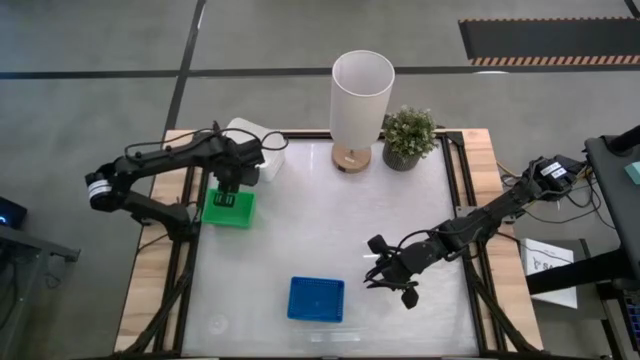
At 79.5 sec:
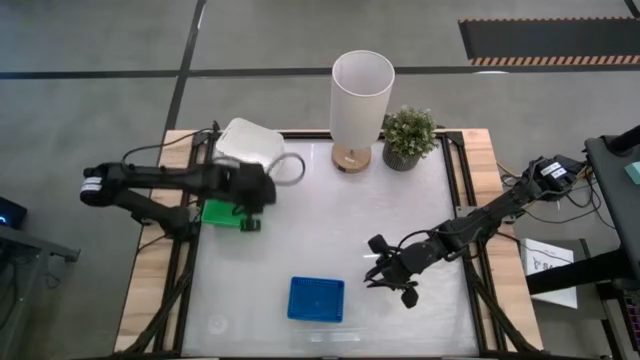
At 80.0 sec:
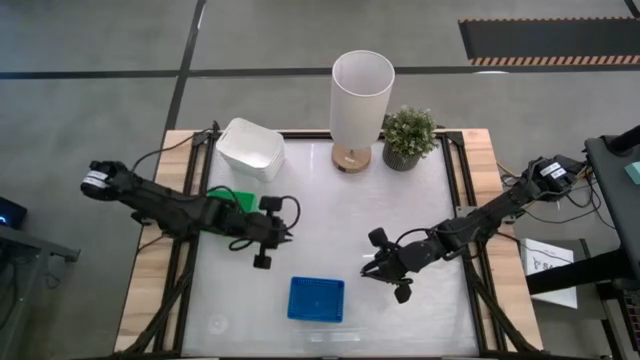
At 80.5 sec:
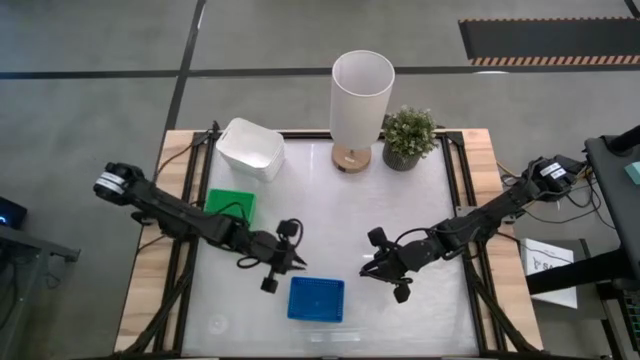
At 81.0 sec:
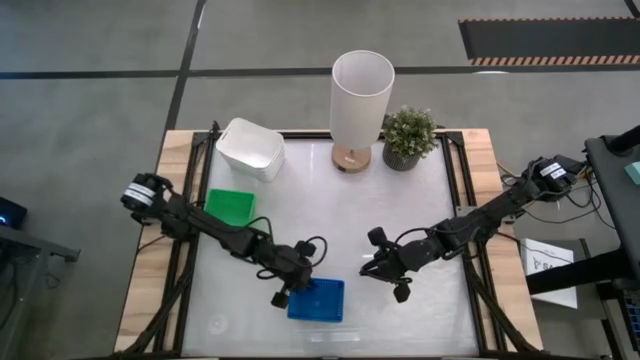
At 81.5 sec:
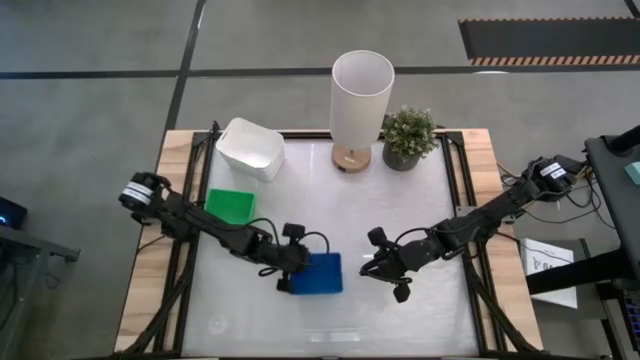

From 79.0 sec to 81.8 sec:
Adjust the stack of blue bins

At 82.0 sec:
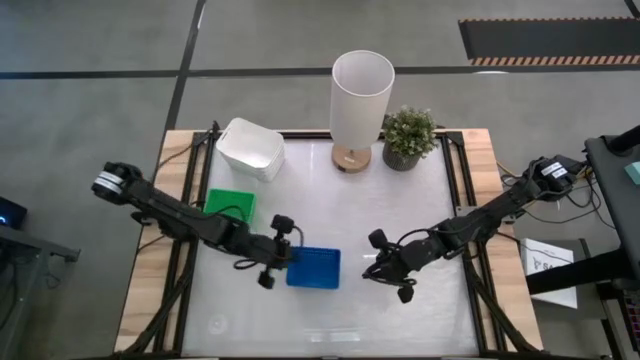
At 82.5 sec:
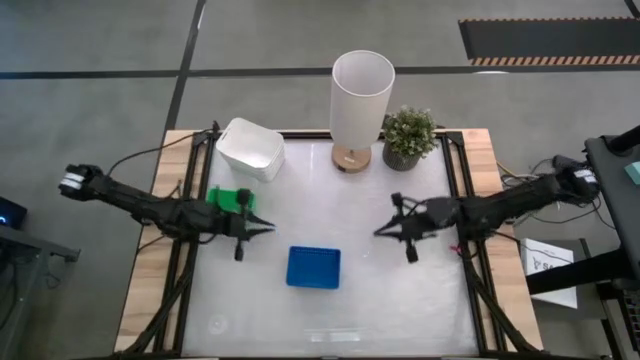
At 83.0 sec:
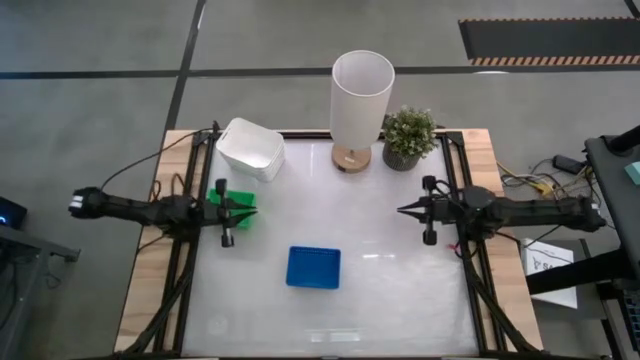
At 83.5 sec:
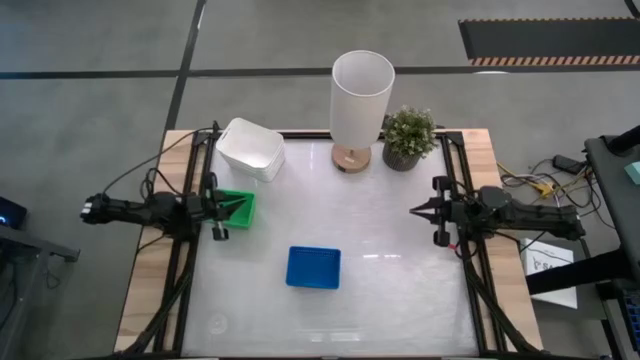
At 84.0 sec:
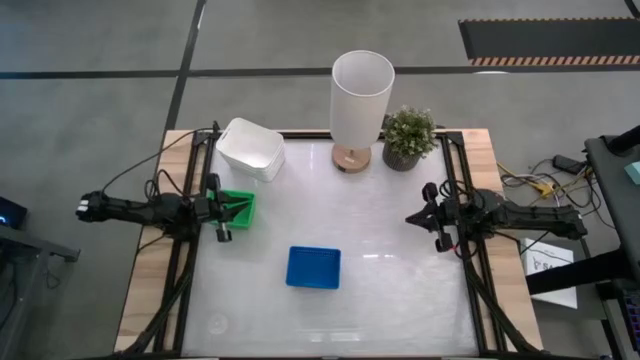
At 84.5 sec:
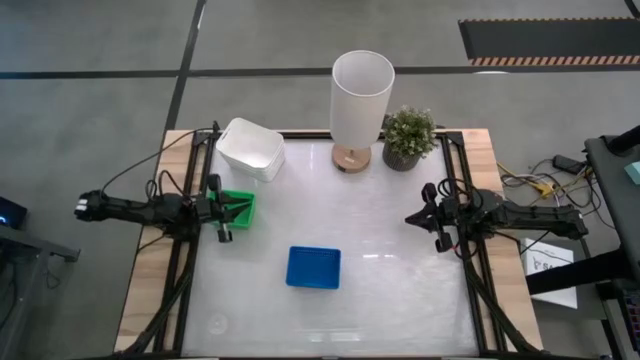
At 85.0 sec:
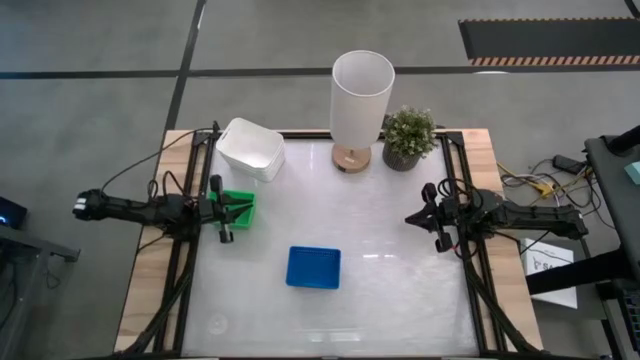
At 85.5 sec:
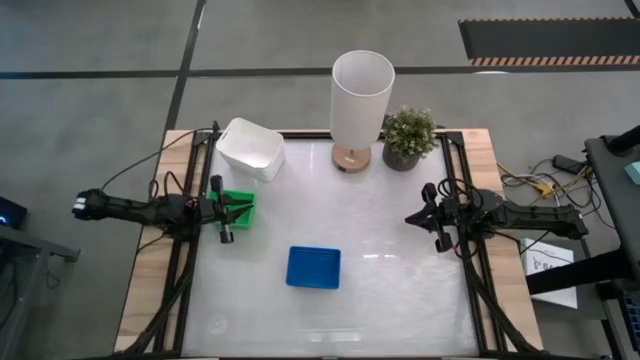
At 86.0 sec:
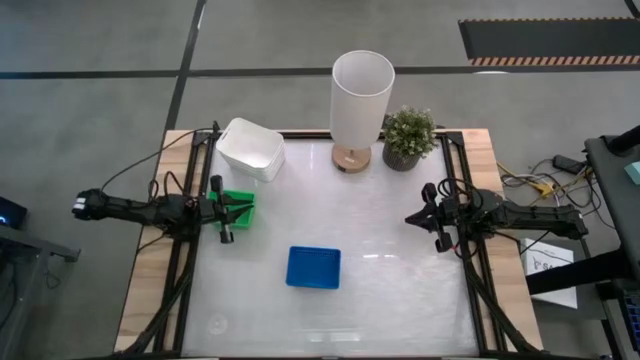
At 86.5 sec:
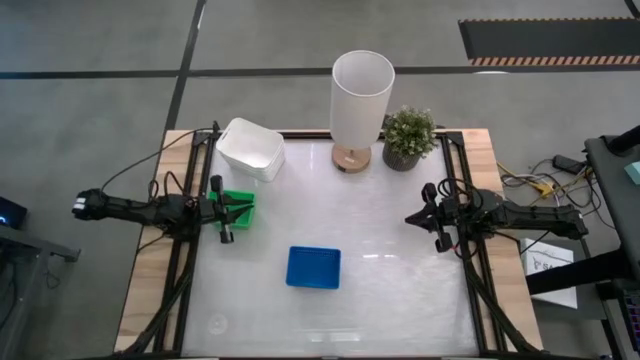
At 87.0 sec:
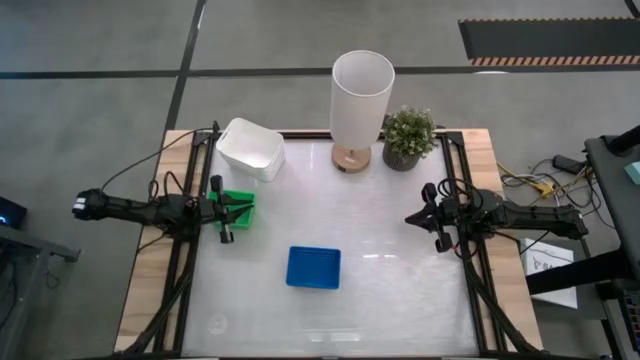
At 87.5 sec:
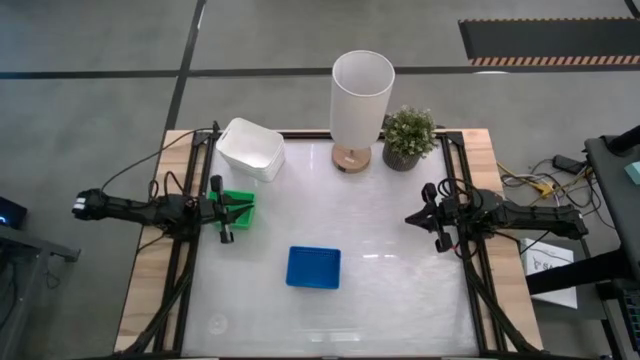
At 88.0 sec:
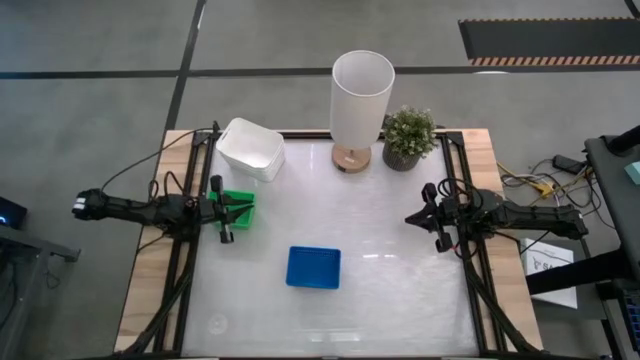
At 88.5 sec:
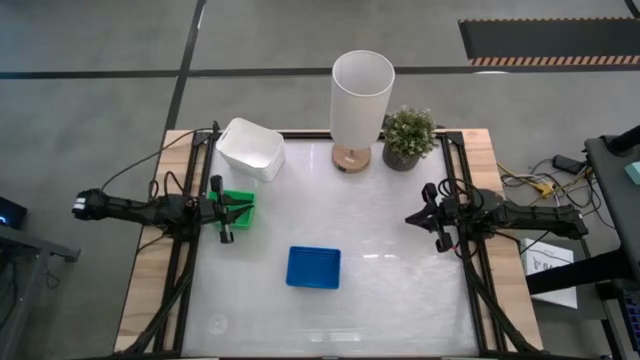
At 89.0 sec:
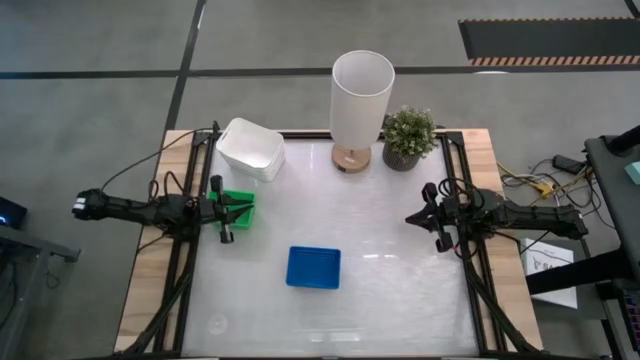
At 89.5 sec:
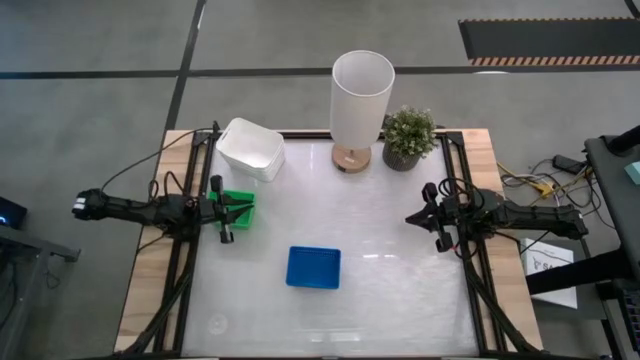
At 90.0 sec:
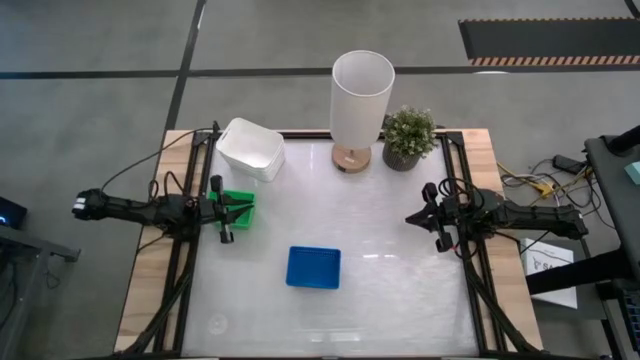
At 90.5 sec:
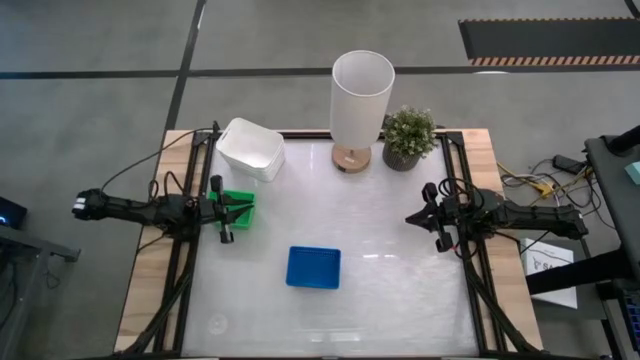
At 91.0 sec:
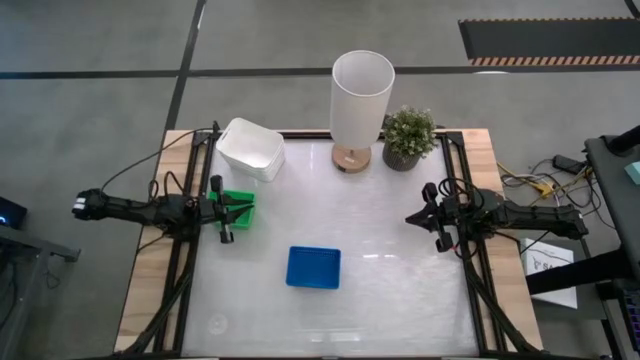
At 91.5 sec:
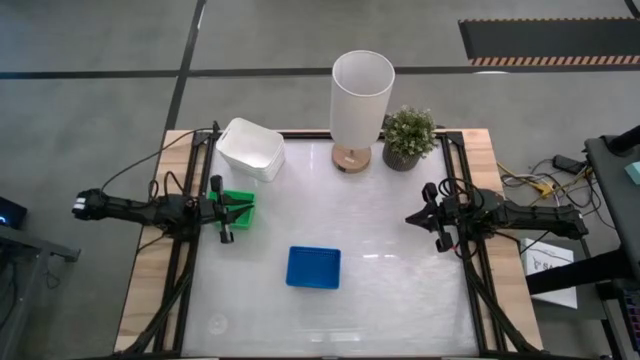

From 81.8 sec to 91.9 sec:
Return to Home Position

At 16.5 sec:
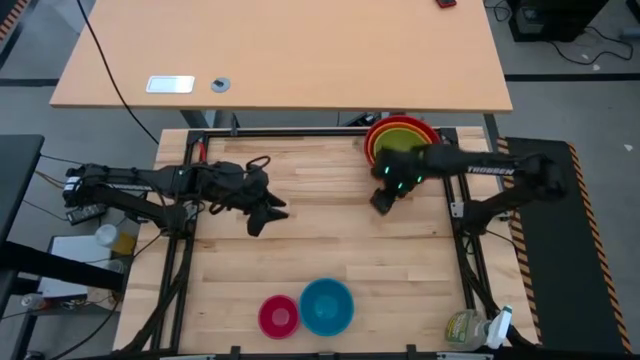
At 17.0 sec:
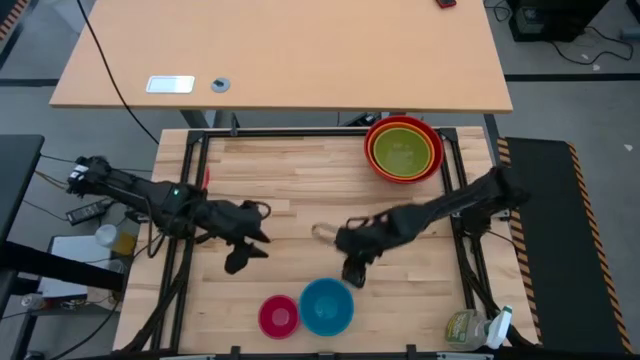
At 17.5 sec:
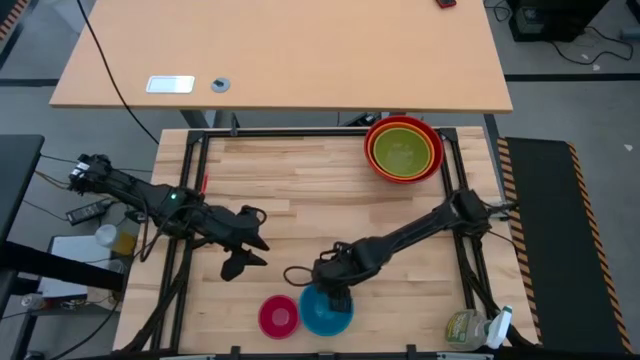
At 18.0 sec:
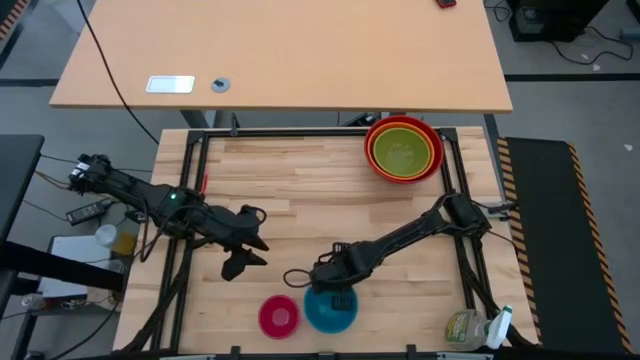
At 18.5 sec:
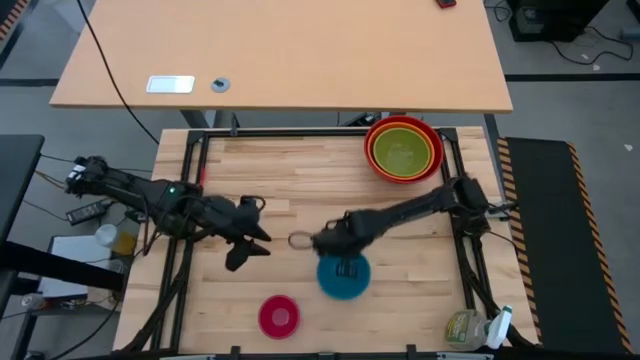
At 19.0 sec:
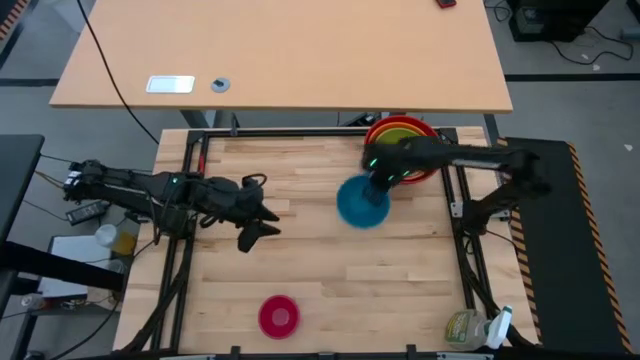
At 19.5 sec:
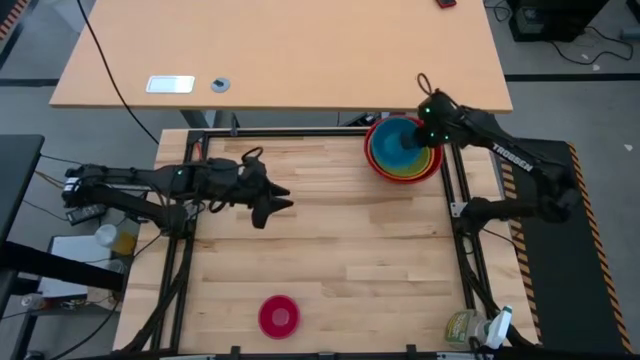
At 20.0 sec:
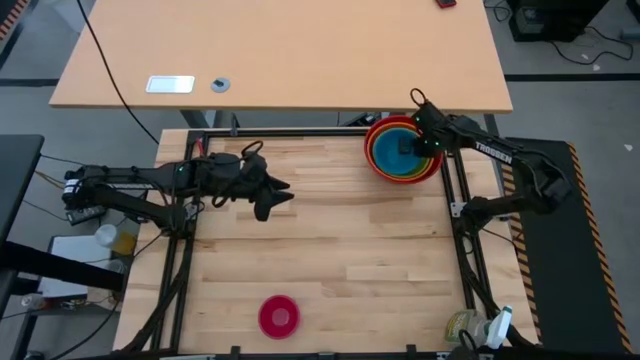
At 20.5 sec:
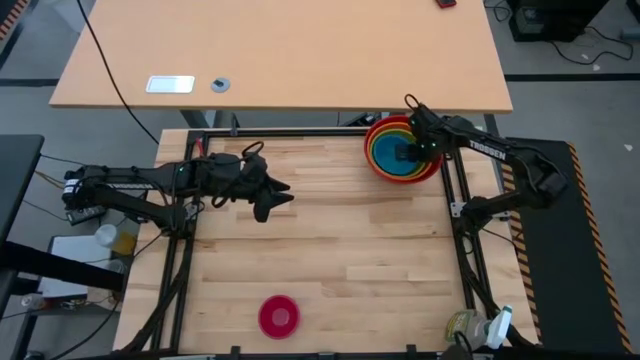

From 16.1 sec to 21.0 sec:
Stack the blue bowl on the green bowl
